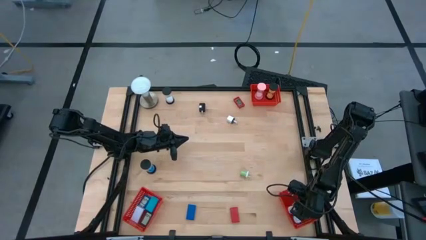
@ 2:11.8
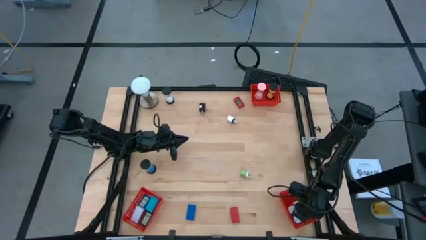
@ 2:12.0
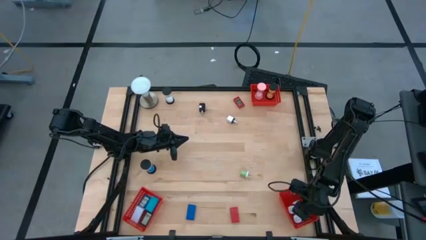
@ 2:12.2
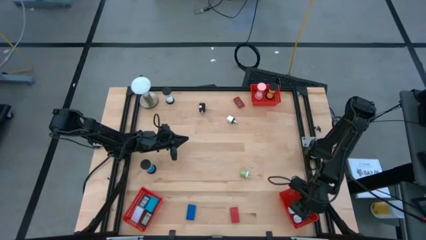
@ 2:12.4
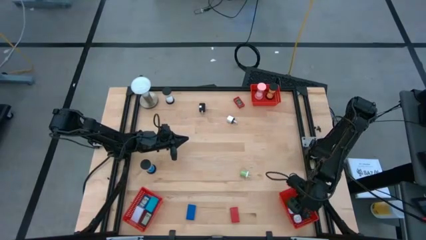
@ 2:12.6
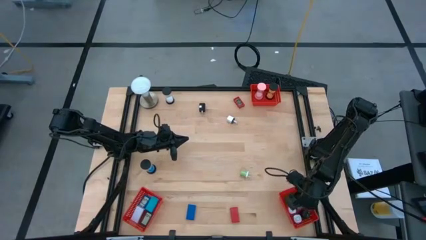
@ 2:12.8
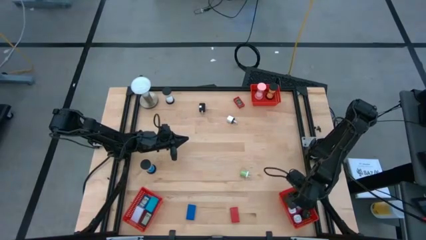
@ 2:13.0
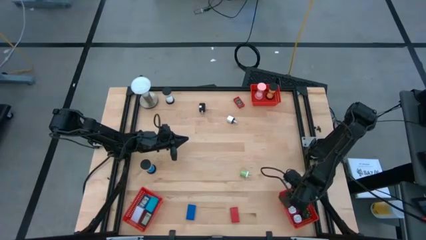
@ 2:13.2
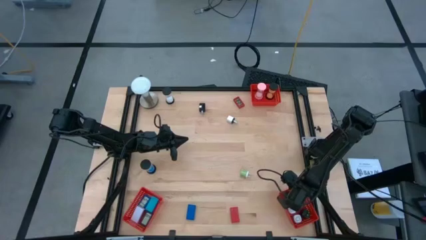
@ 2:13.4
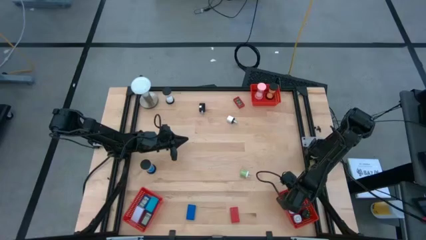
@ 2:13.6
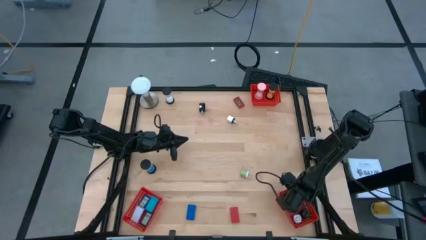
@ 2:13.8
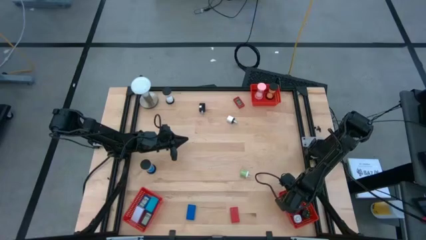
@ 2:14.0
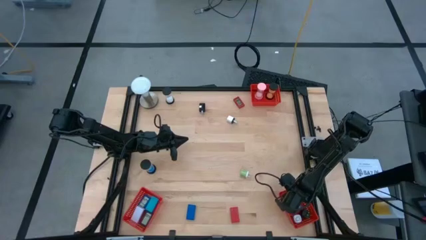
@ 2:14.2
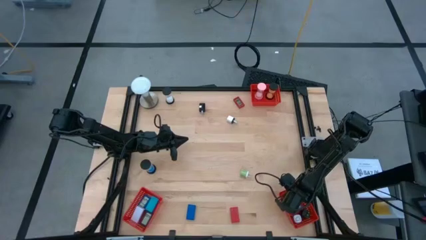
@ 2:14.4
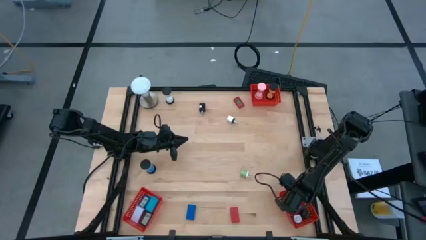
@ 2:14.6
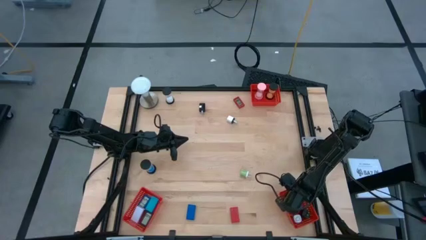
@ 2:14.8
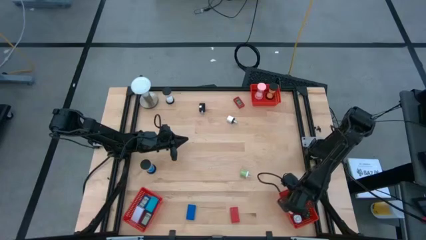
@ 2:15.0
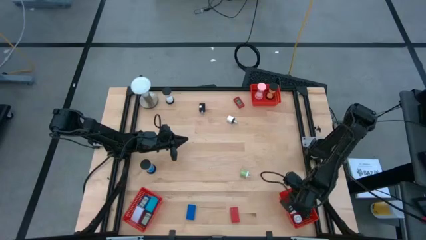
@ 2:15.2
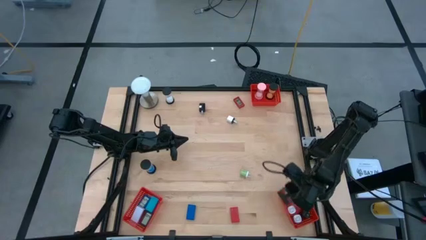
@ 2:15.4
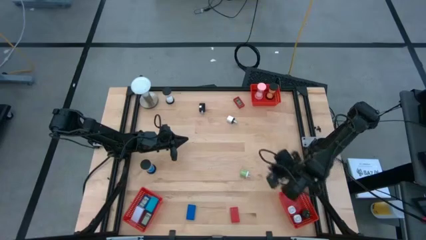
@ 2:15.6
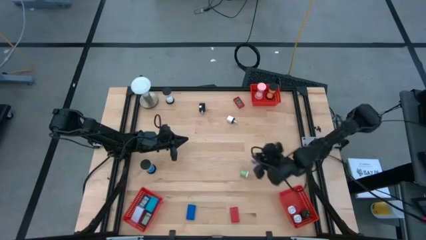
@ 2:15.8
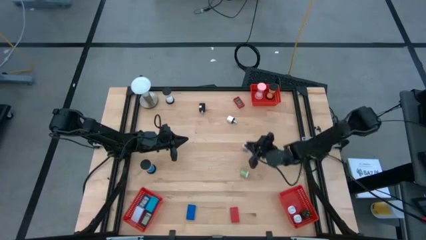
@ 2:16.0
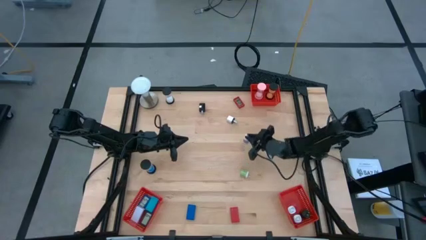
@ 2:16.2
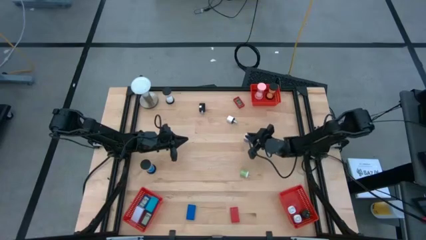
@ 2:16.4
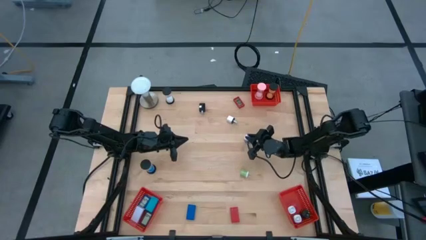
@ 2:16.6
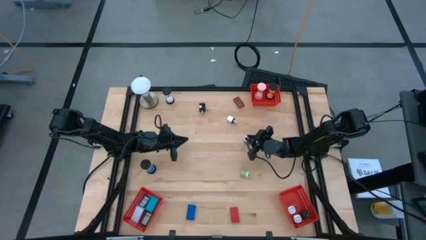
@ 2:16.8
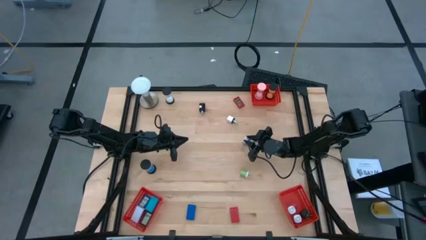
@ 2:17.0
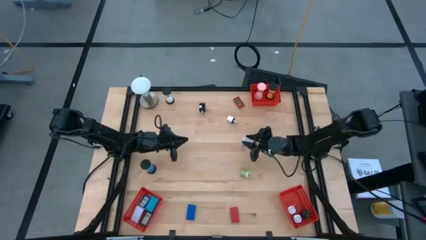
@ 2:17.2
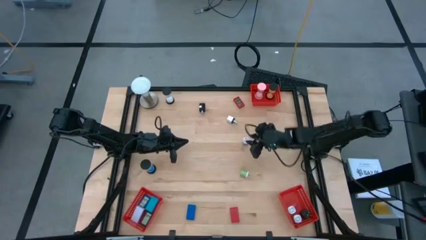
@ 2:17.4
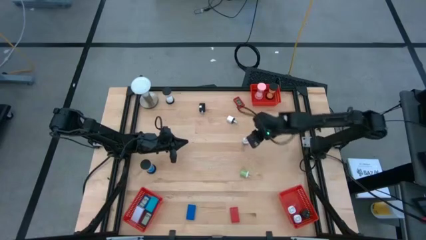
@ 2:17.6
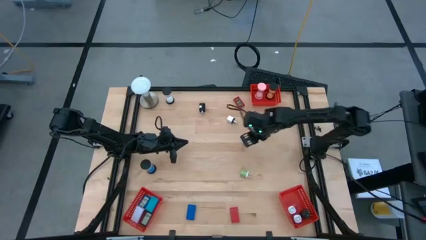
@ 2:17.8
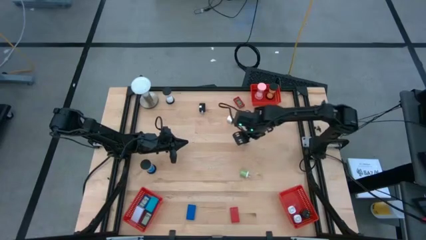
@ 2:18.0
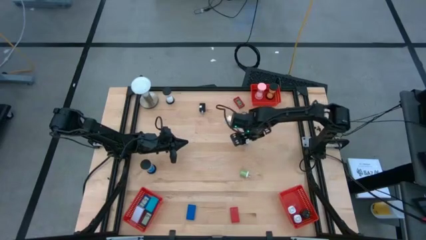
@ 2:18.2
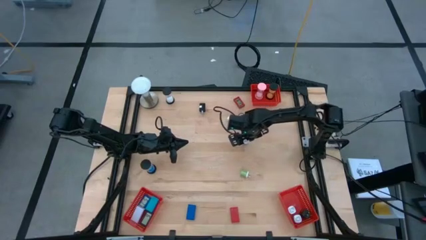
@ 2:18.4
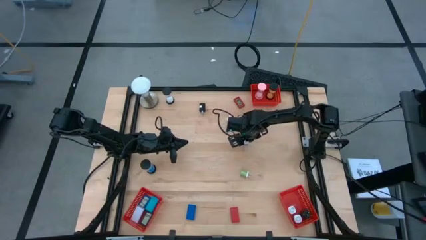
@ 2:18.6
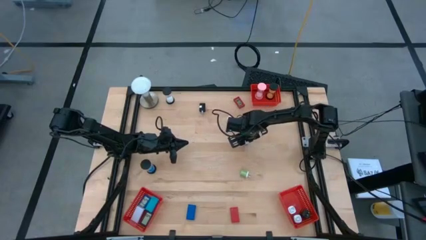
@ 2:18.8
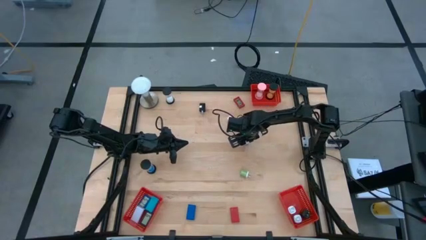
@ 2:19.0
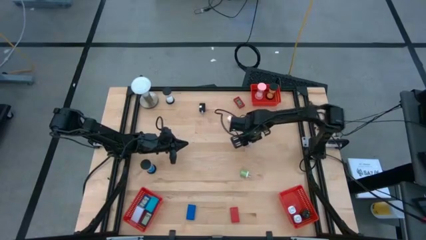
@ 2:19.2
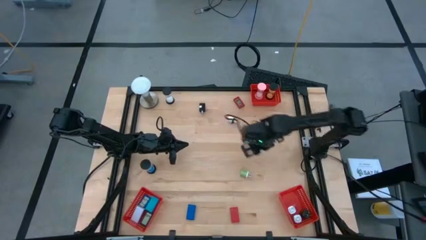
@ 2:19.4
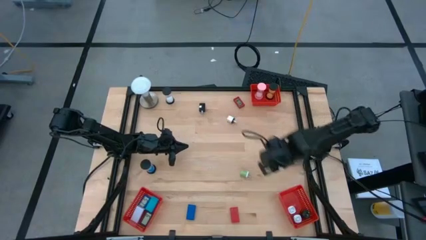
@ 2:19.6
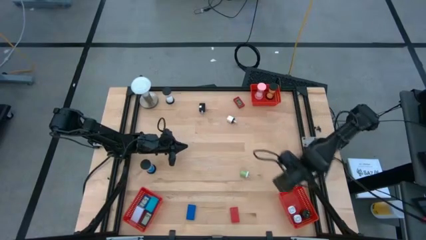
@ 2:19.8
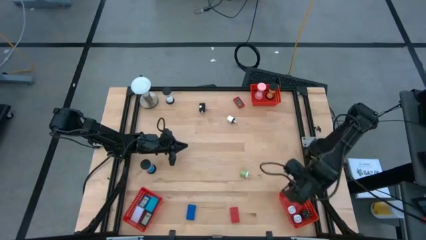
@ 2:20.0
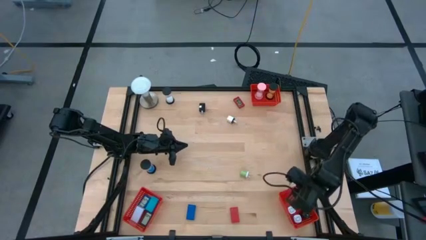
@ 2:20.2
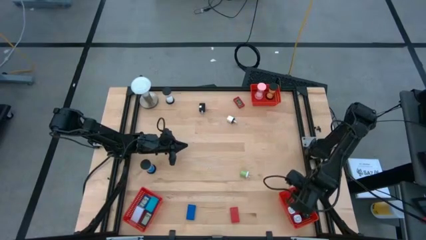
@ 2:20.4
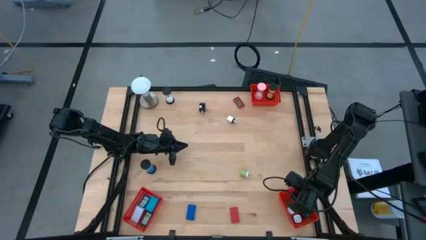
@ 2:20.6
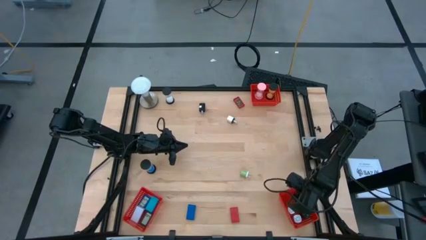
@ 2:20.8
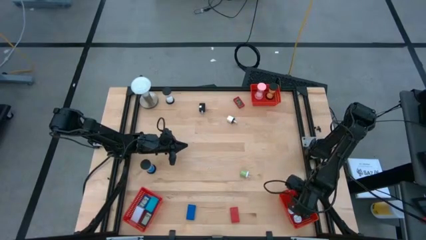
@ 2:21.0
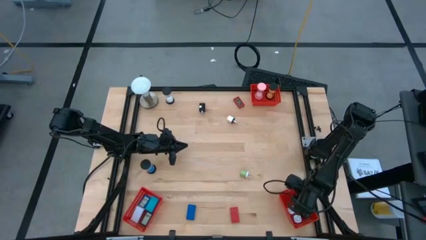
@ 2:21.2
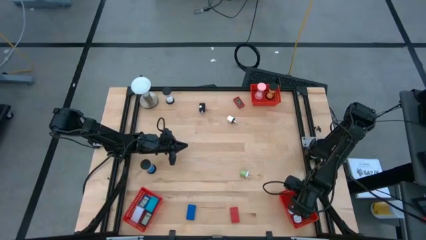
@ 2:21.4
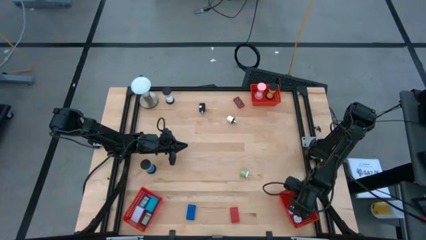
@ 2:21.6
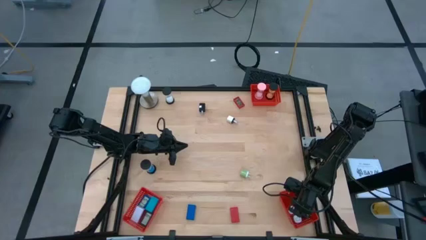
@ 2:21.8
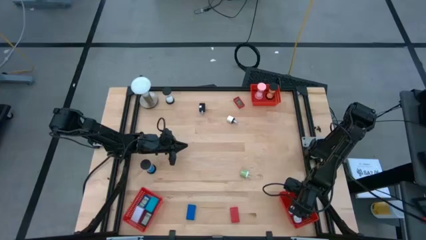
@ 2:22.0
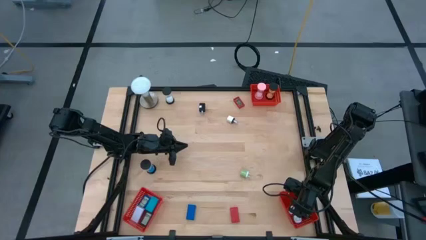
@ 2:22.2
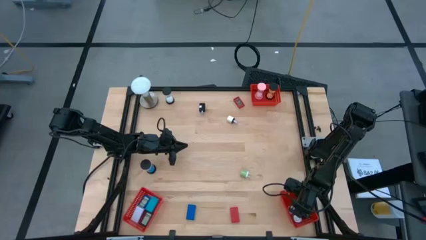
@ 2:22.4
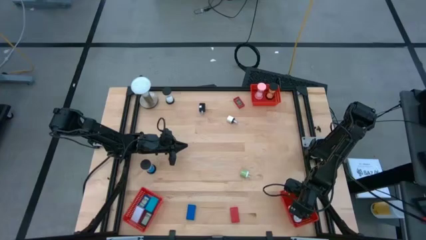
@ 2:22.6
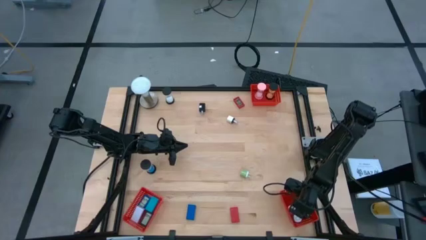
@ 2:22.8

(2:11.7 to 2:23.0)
Task: Pick & Place Office items
Put the blue charger adapter into the bottom right red basket

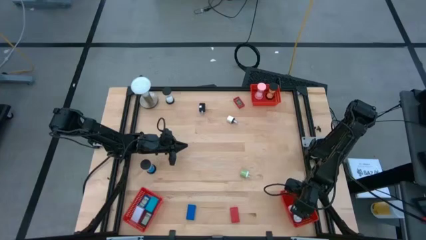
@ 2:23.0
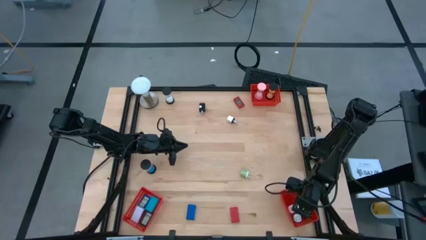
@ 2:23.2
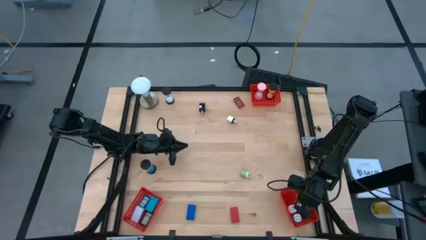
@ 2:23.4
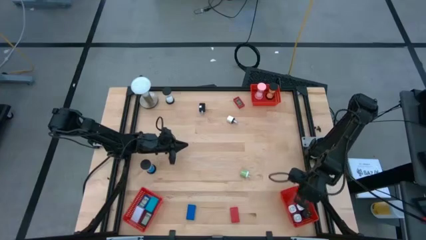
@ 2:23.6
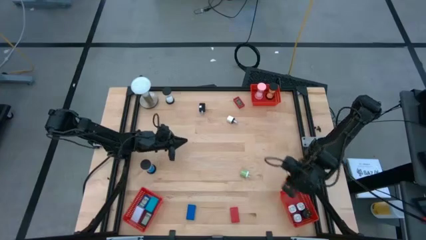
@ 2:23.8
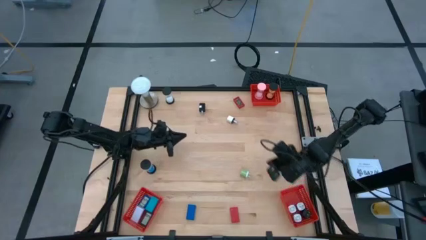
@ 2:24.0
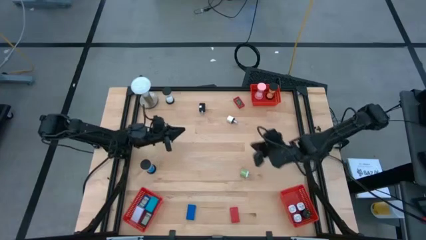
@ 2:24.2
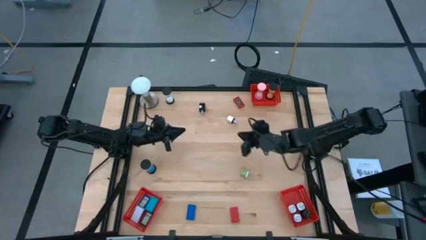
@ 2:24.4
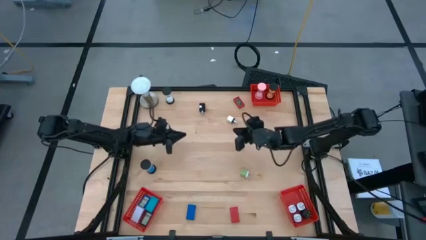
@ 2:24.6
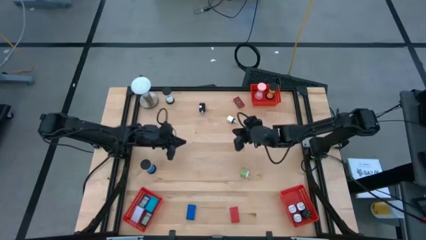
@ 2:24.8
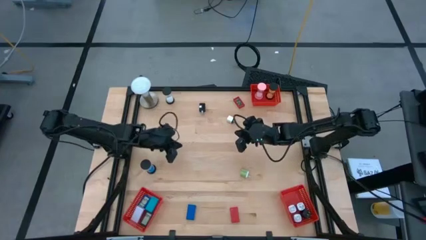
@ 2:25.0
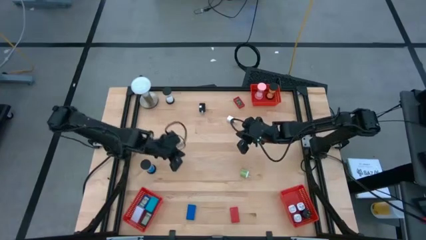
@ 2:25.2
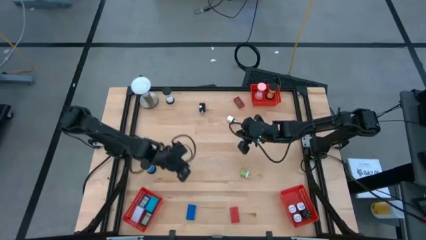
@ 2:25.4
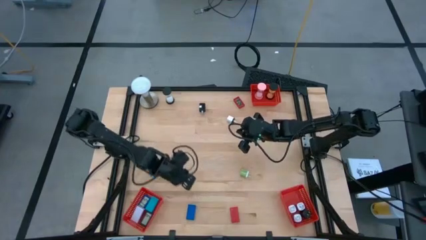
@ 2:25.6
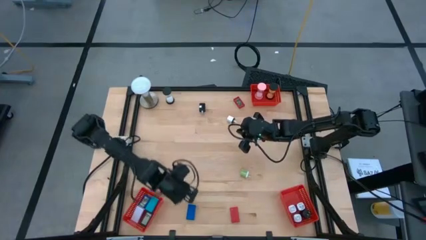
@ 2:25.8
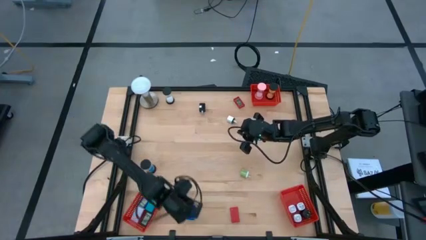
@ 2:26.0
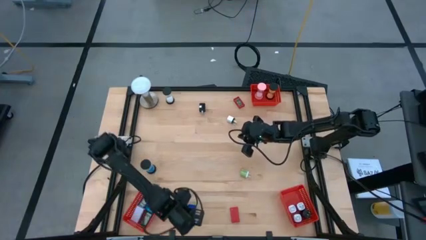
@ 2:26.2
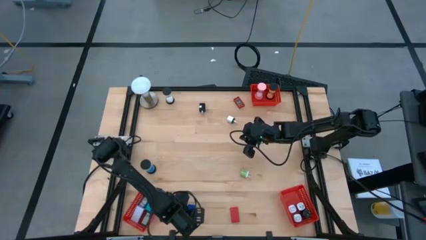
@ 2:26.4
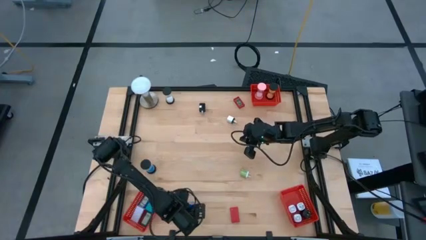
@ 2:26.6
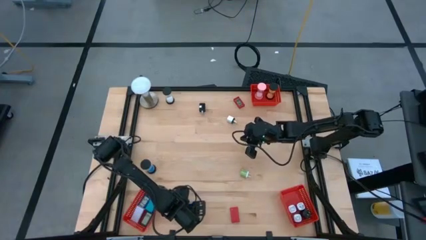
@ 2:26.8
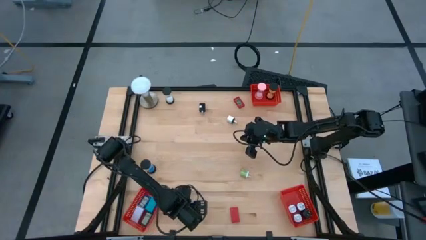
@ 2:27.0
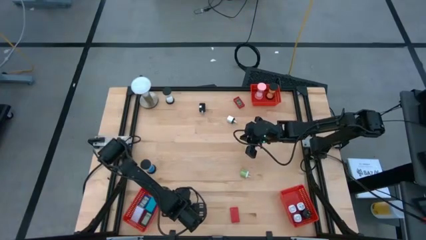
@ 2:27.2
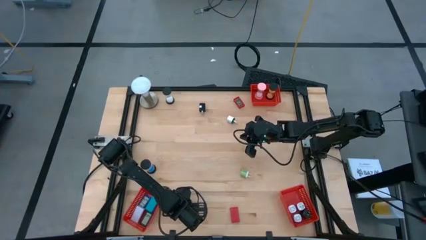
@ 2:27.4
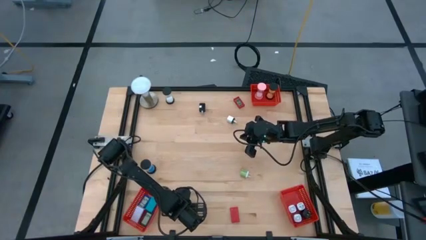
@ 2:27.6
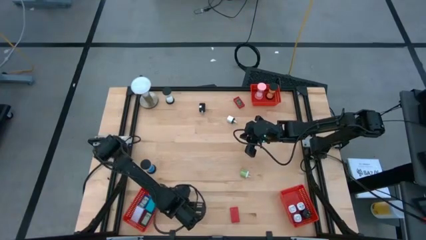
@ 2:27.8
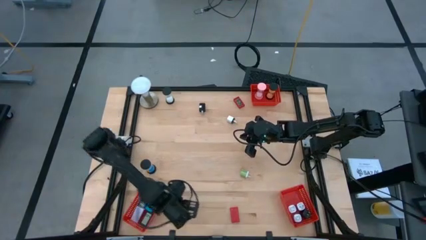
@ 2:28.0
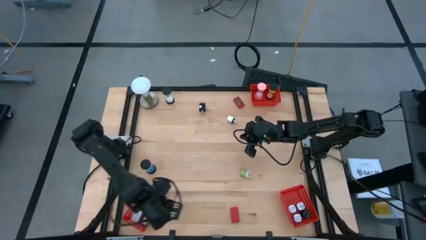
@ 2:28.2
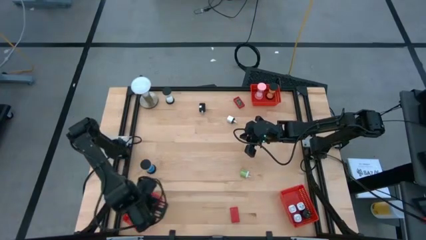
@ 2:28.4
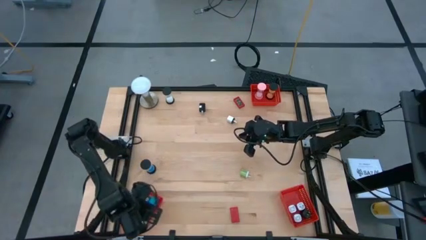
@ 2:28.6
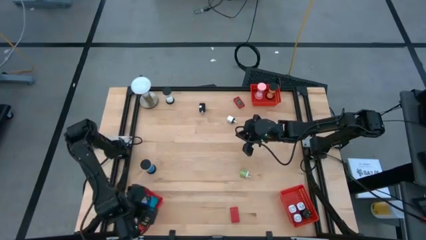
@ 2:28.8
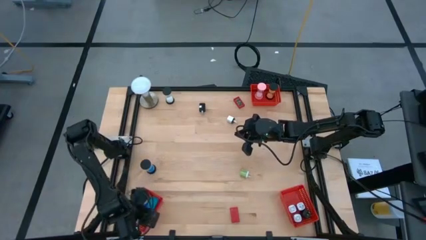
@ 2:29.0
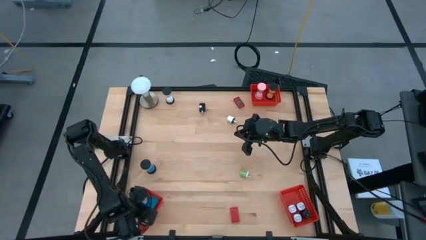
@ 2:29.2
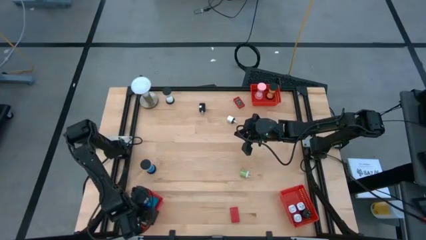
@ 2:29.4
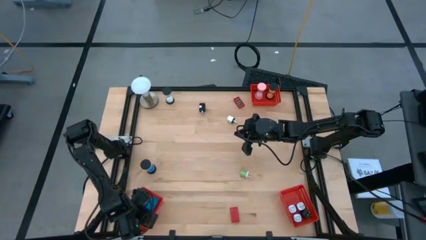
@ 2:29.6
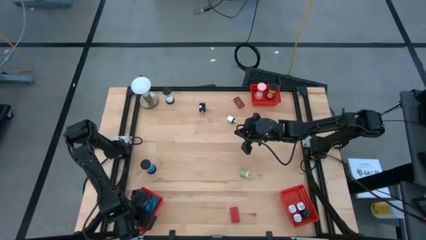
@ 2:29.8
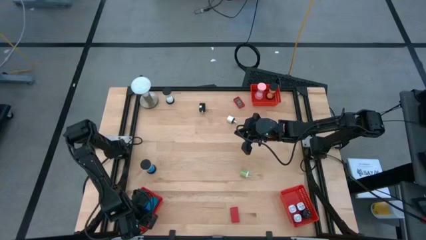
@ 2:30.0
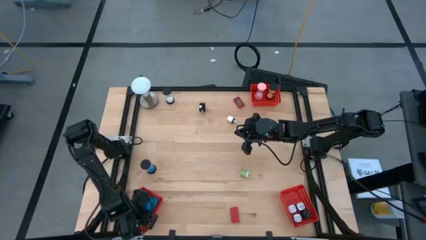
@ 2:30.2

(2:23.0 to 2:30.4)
Put the blue digital clock into the bottom left red basket
